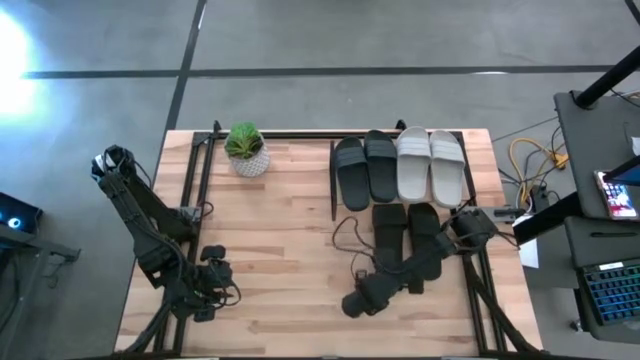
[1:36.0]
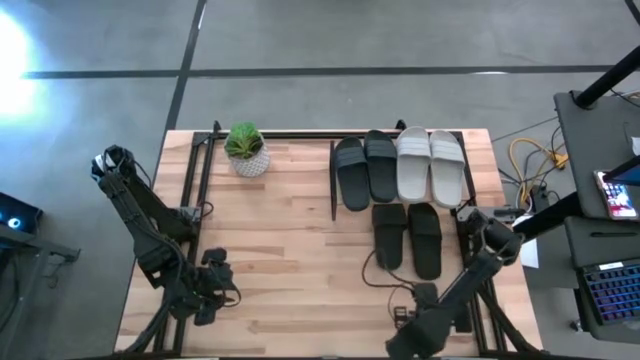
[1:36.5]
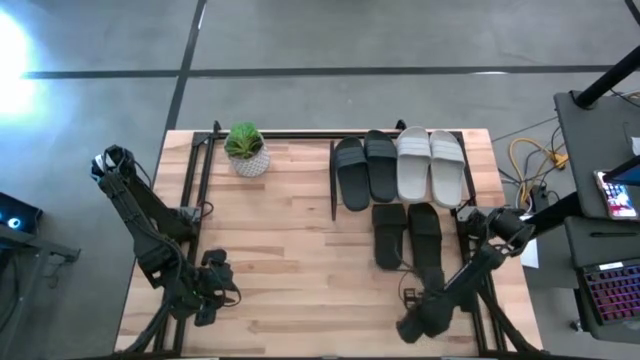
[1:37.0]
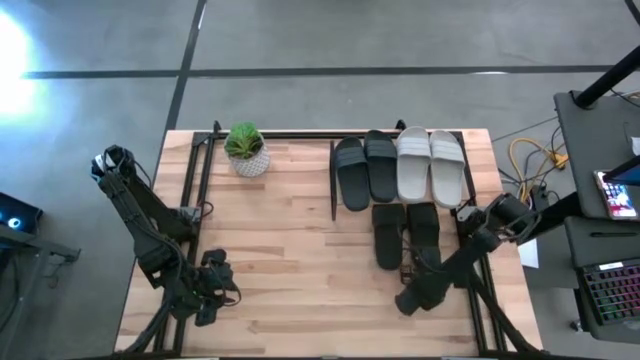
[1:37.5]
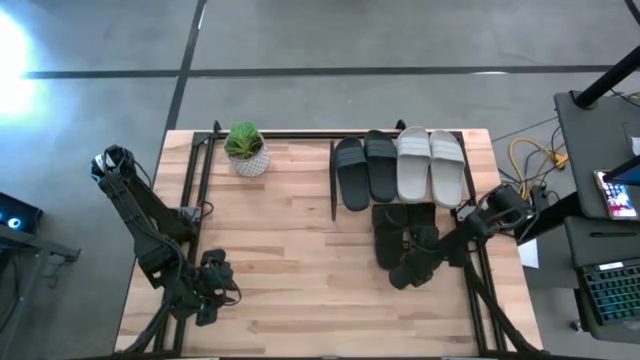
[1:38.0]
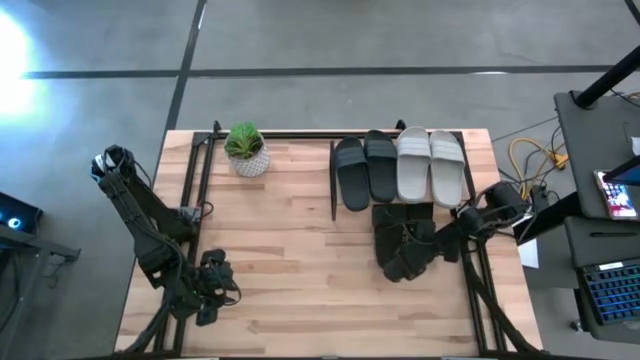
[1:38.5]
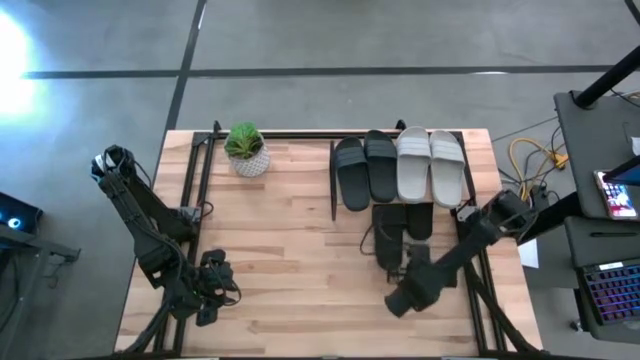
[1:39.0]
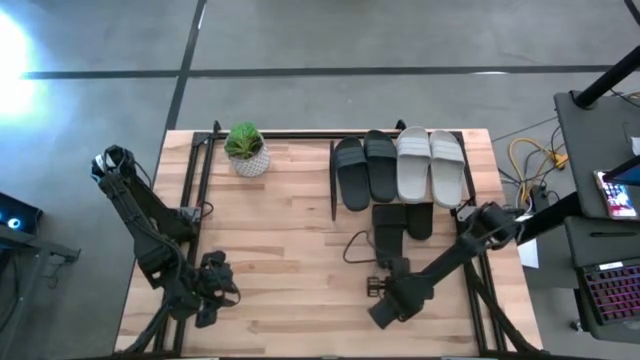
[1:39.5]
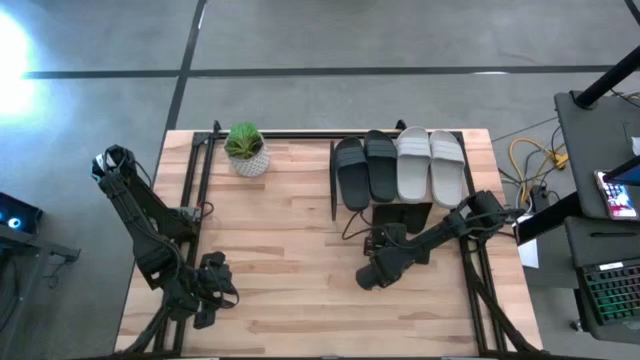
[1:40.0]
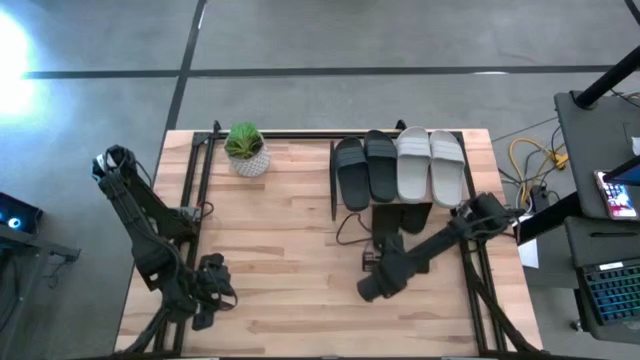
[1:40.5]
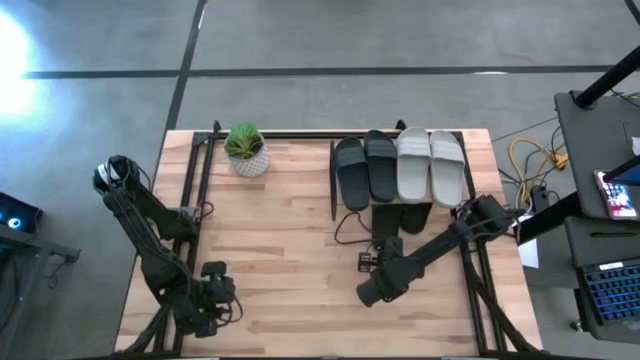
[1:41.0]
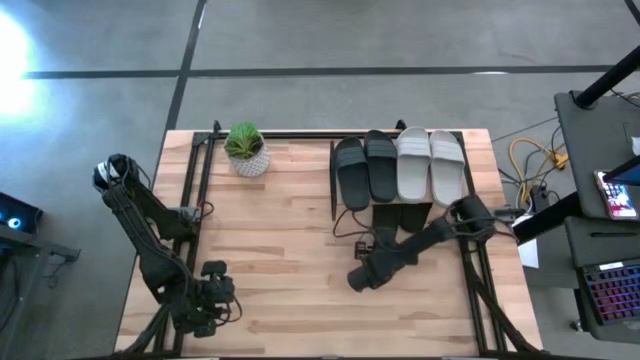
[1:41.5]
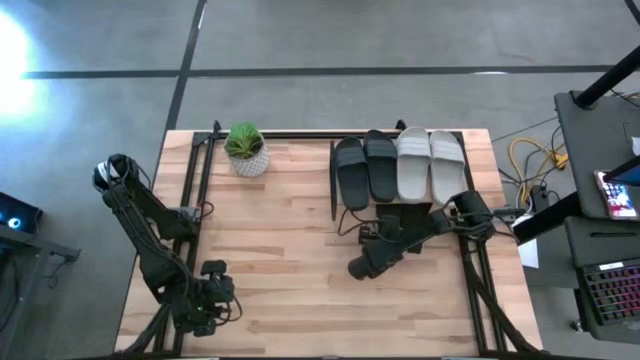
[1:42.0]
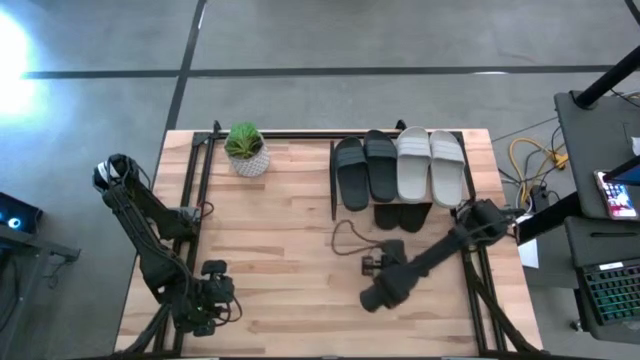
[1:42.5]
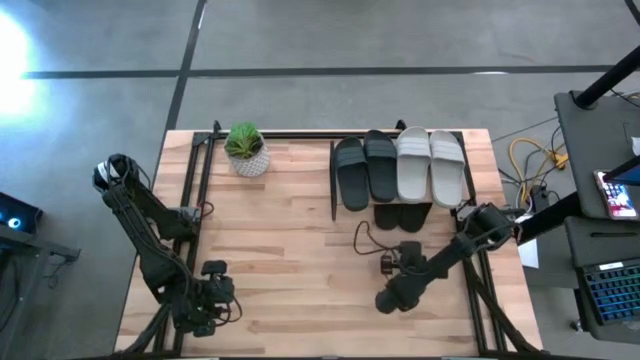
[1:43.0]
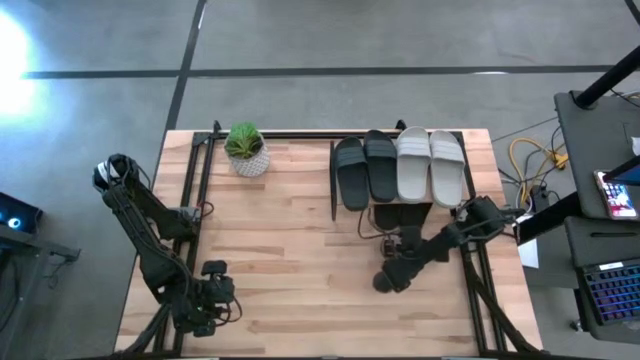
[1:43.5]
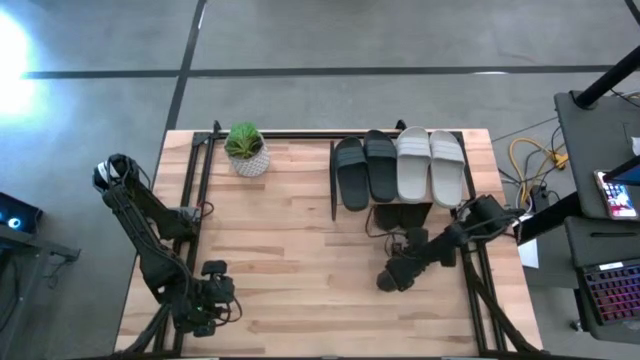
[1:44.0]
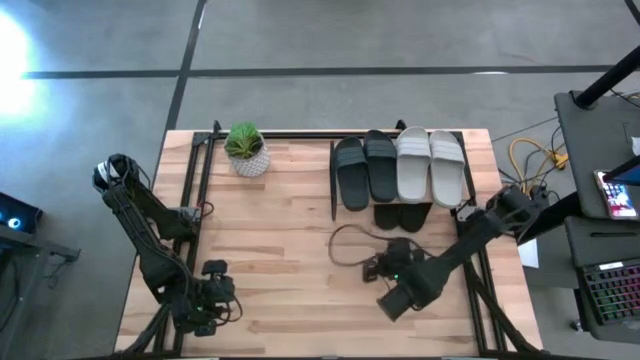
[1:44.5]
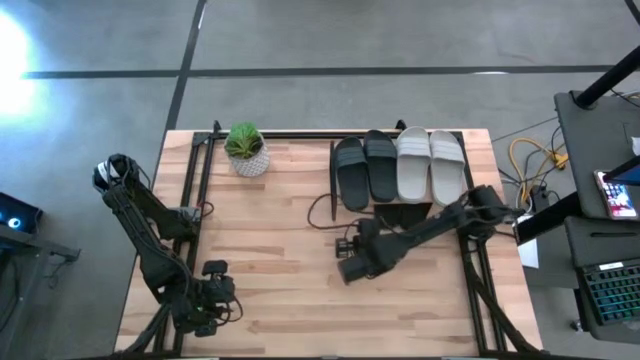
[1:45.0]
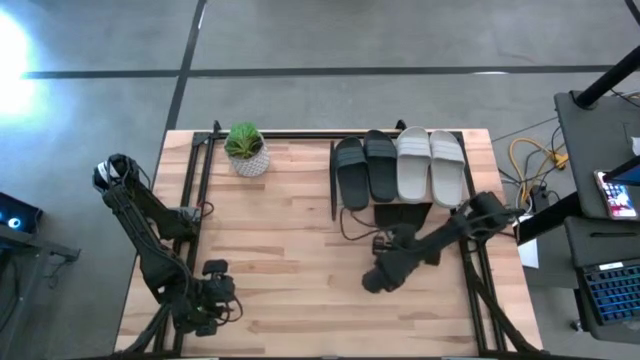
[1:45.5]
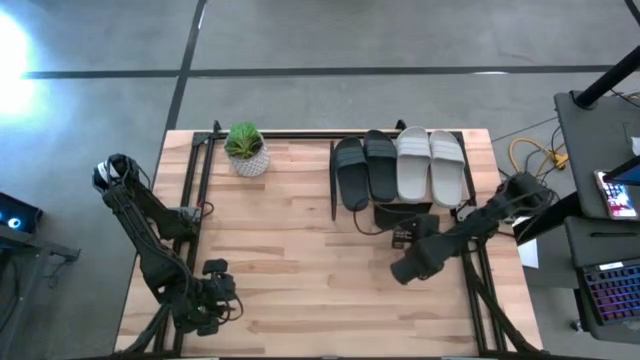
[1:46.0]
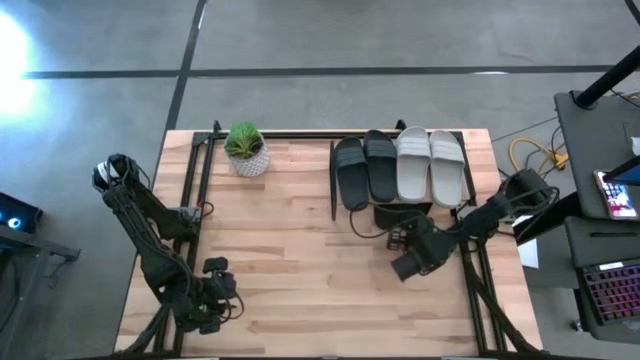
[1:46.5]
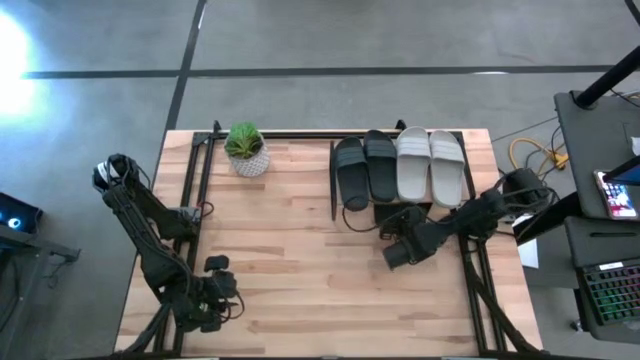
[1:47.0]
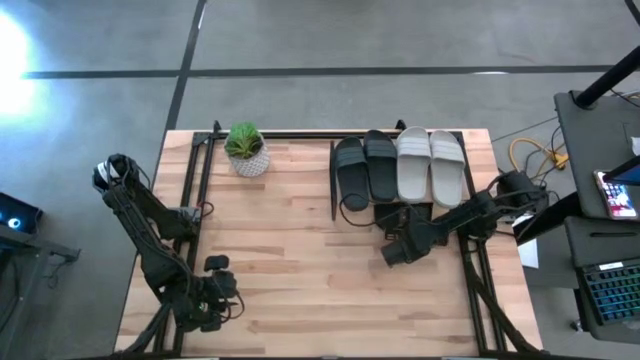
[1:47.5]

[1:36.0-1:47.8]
Task: Pick and place slides into the shelf
Adjust the black slides under the shelf

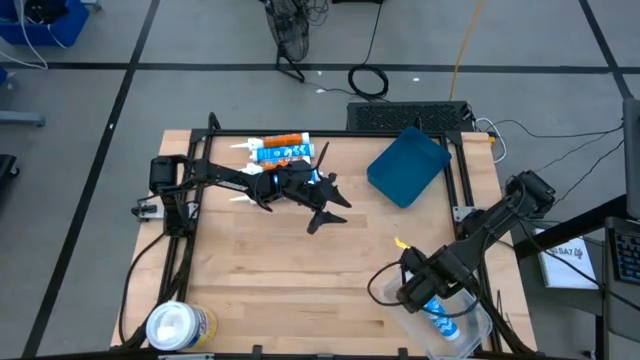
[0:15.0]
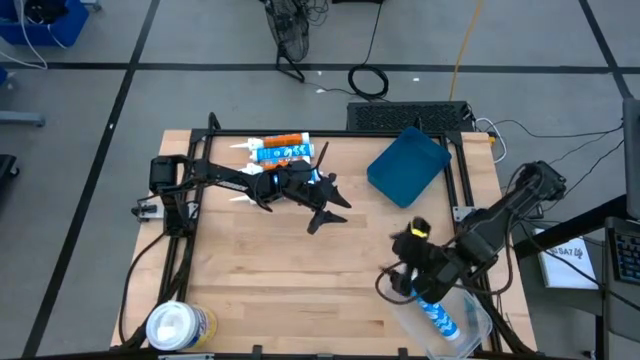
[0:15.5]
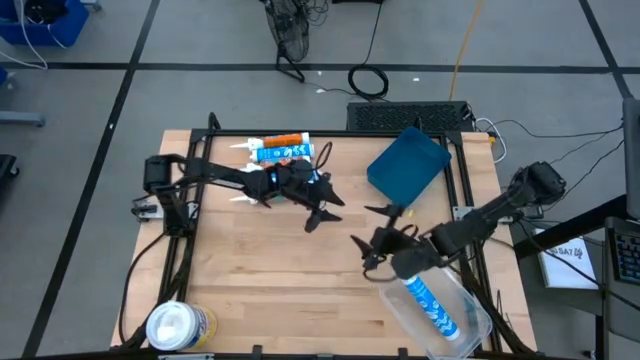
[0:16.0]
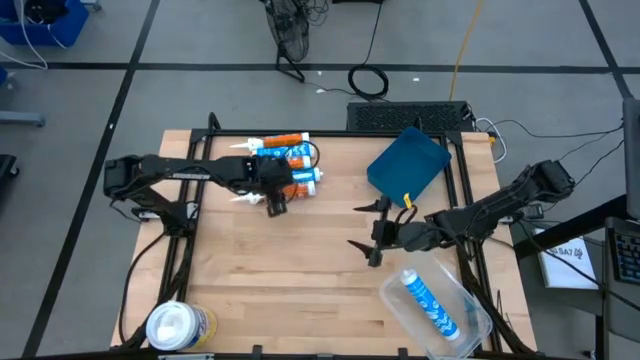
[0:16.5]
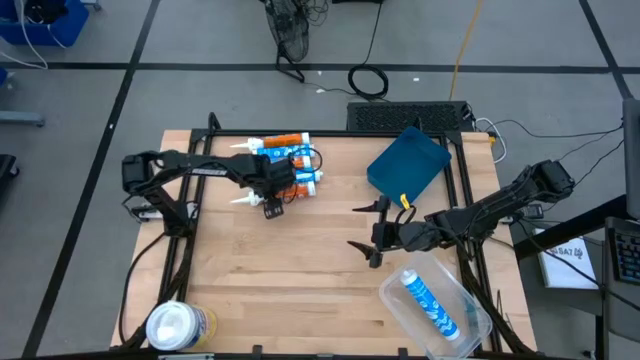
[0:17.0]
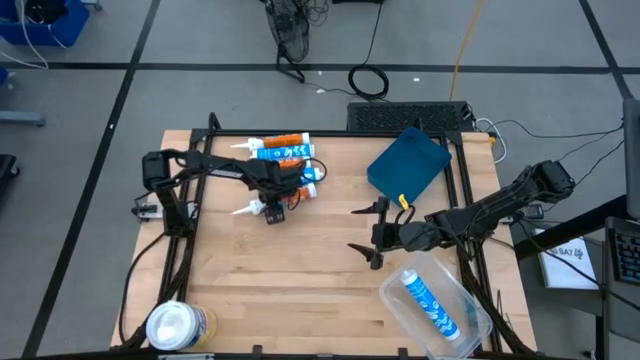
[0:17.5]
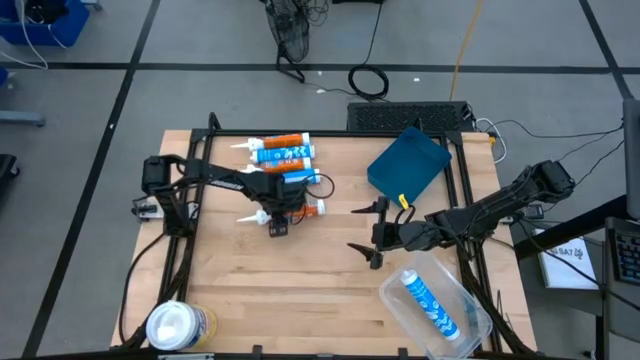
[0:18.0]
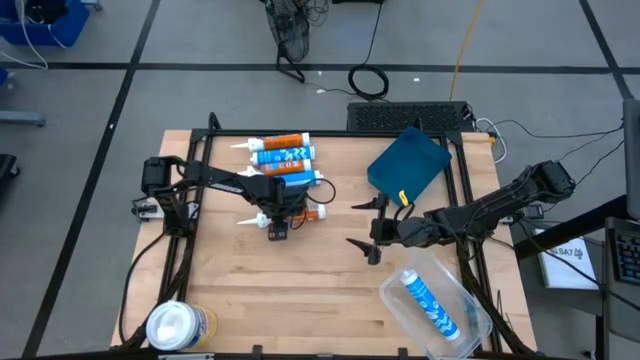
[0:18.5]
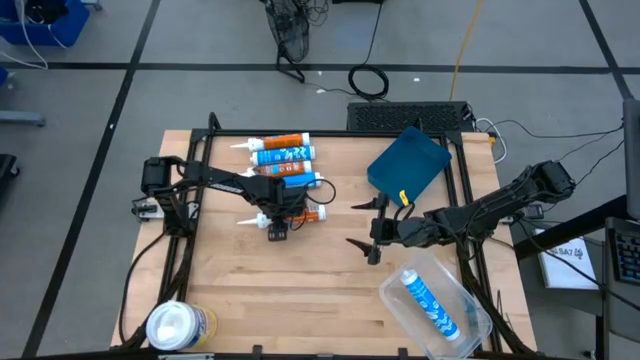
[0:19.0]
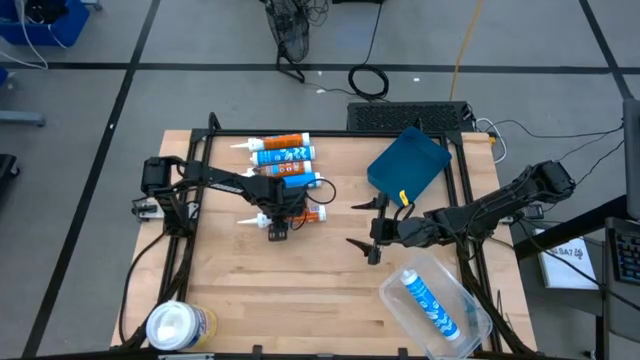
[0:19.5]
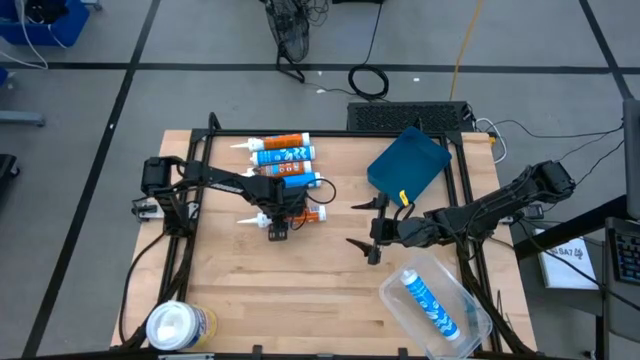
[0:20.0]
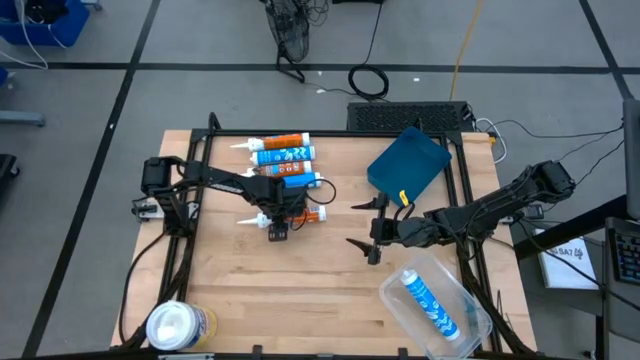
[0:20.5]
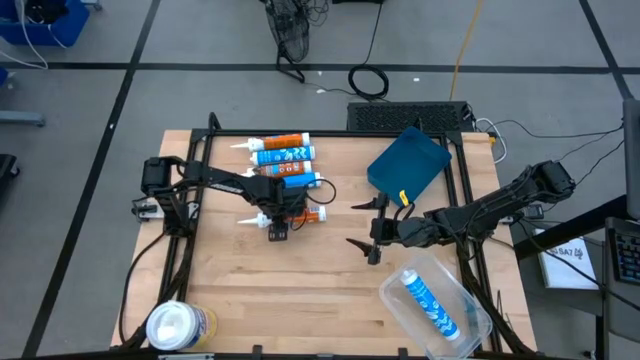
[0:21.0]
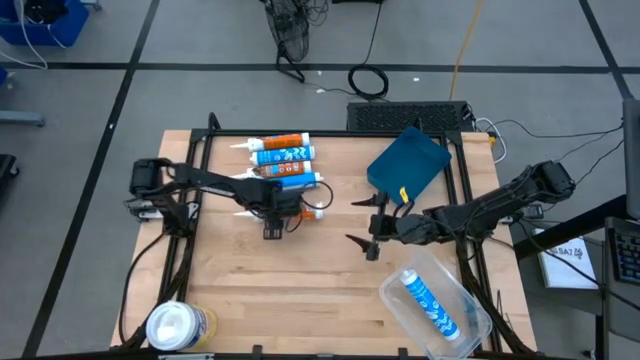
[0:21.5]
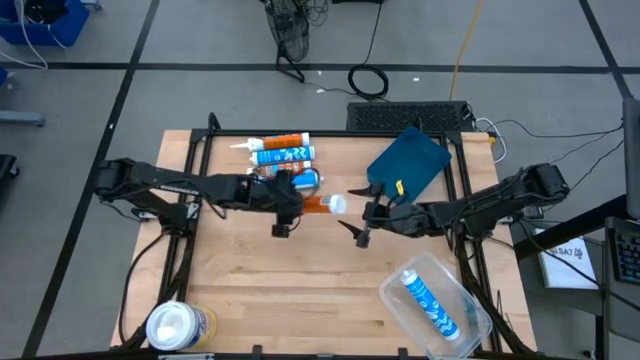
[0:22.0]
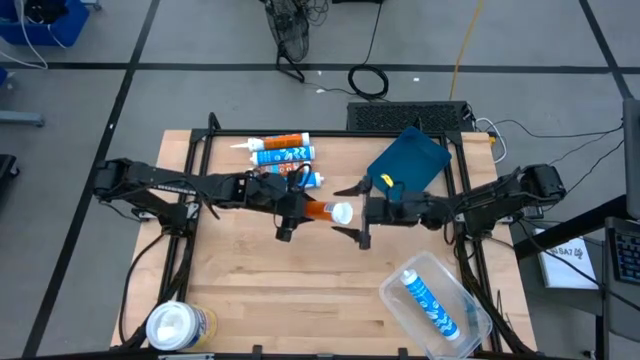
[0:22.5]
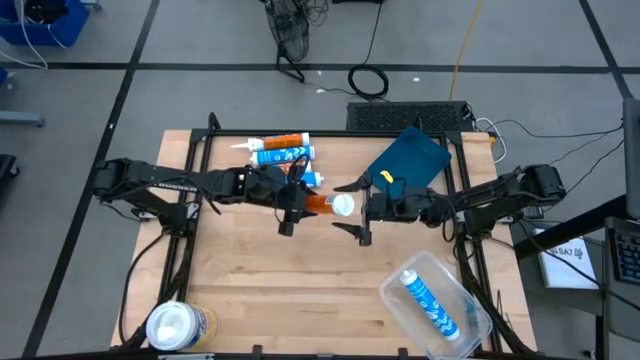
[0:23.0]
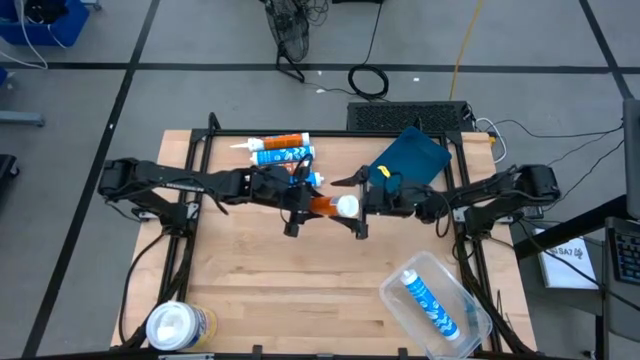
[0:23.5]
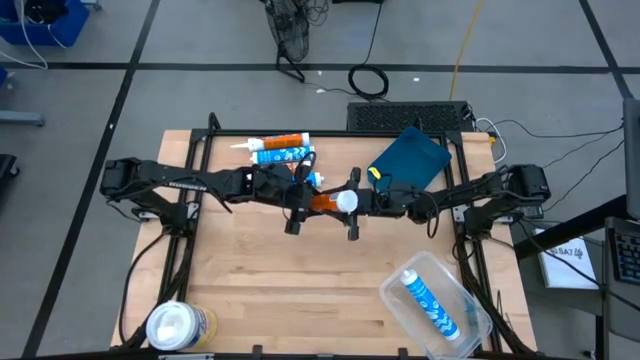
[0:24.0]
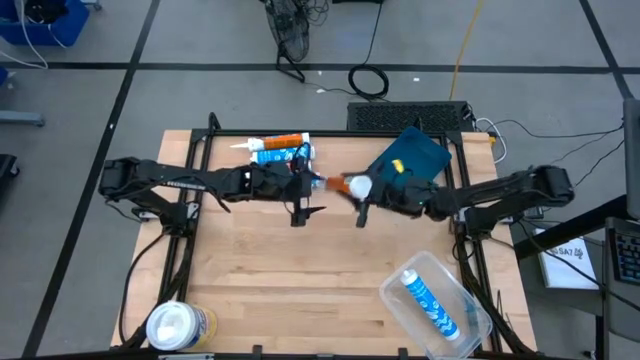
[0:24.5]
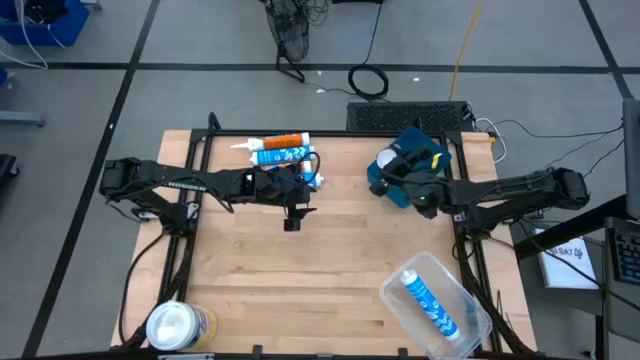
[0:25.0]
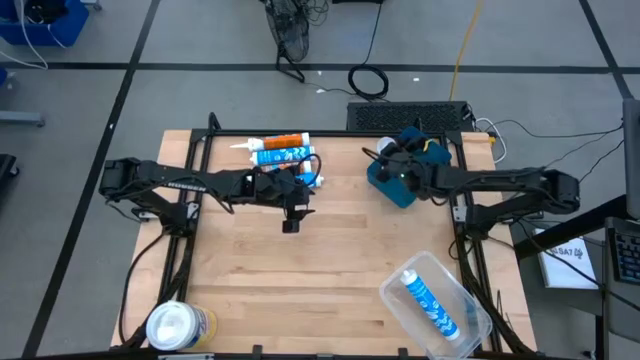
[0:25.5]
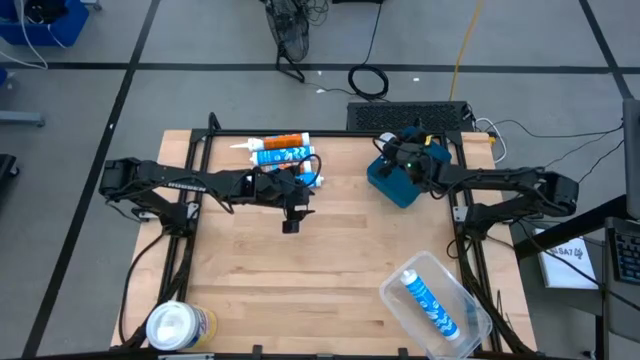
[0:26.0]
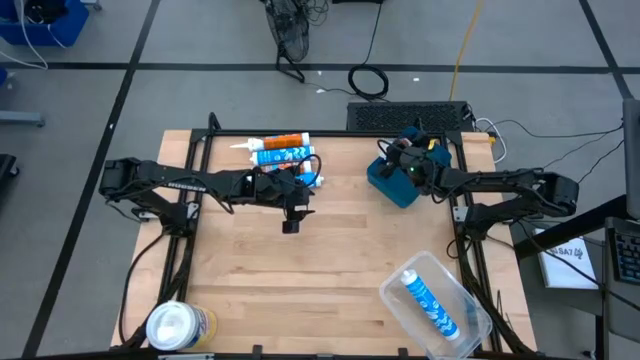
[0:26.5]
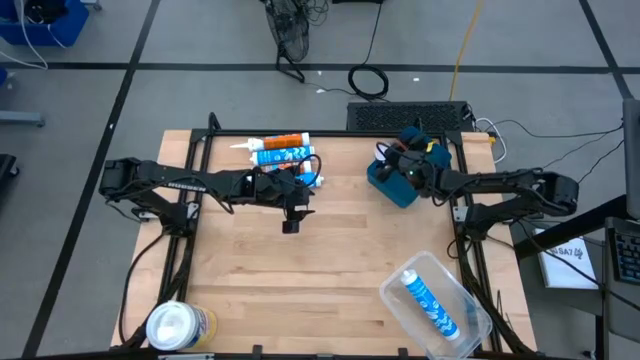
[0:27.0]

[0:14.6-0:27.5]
Task: Pick & place silicon tubes, Sealant and Lysol wipes
Put the bottom orange sealant into the blue bin
